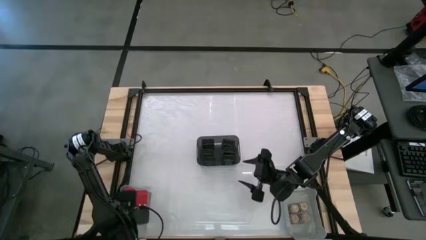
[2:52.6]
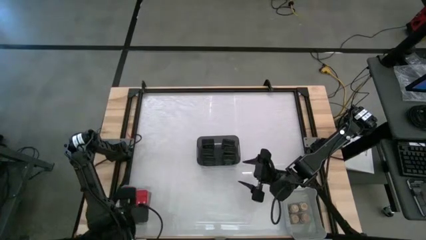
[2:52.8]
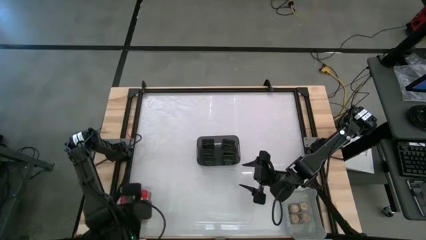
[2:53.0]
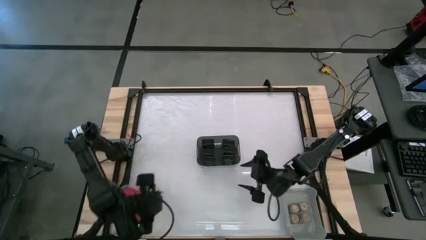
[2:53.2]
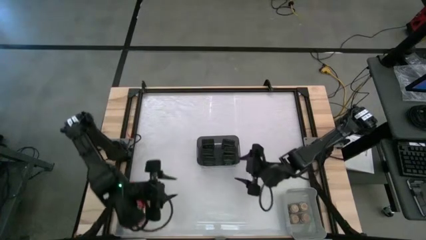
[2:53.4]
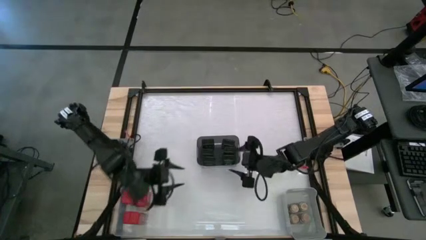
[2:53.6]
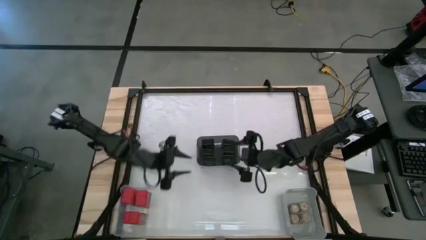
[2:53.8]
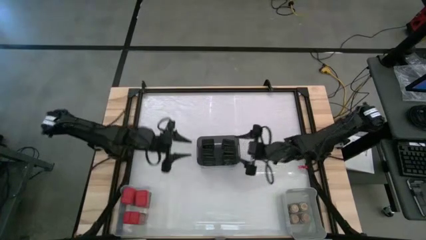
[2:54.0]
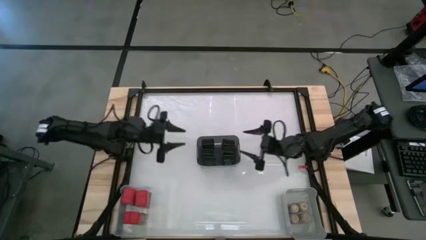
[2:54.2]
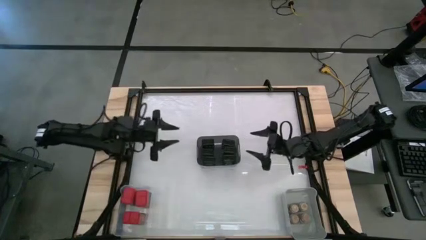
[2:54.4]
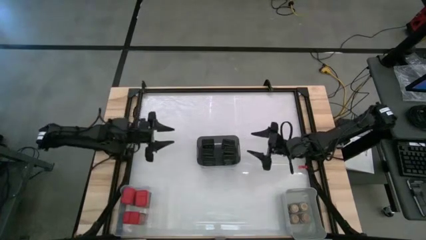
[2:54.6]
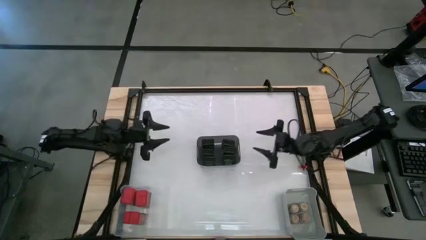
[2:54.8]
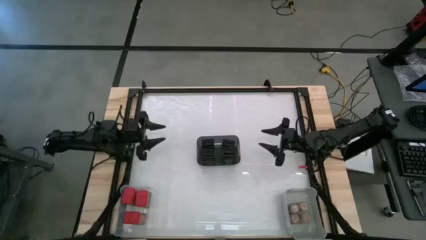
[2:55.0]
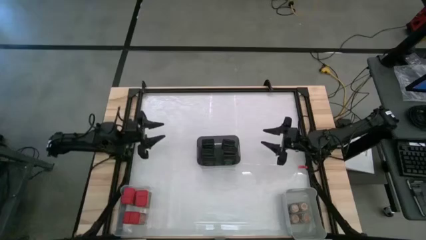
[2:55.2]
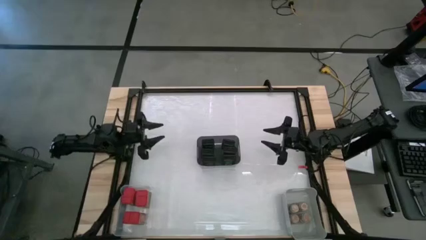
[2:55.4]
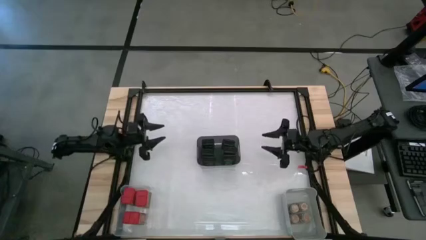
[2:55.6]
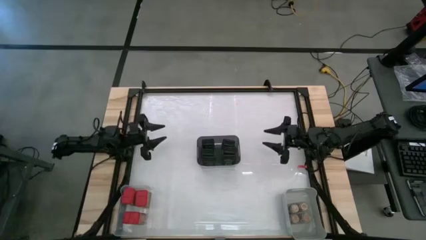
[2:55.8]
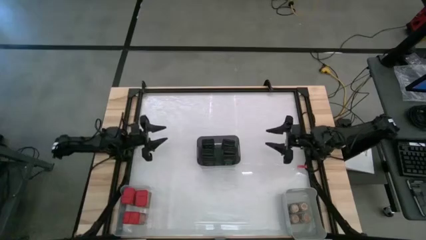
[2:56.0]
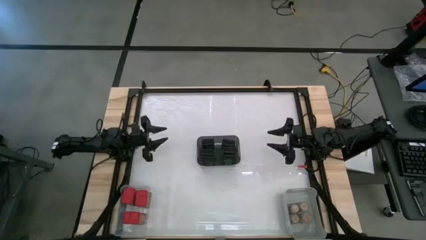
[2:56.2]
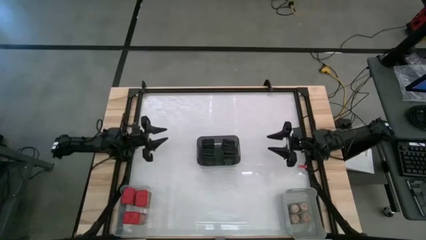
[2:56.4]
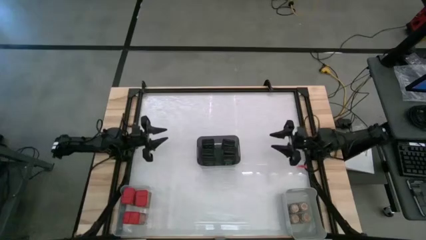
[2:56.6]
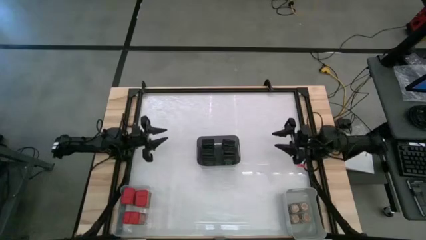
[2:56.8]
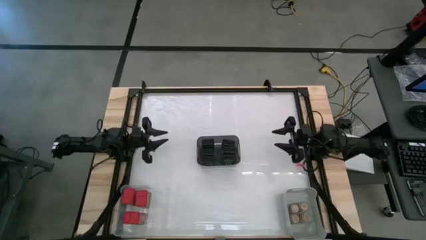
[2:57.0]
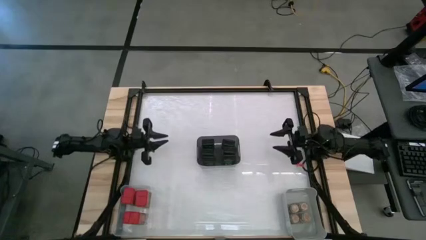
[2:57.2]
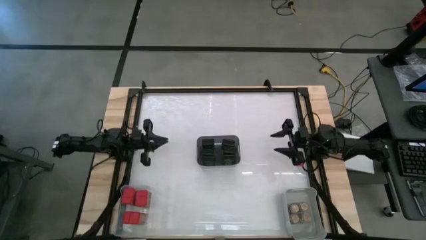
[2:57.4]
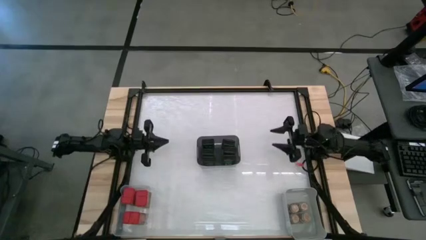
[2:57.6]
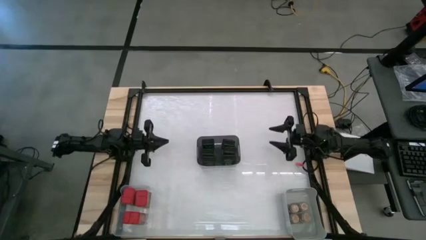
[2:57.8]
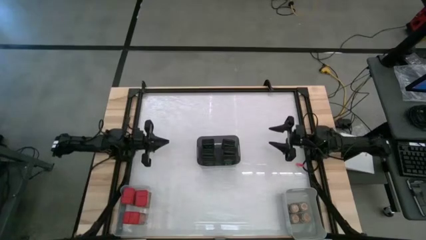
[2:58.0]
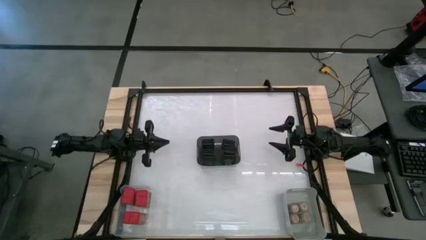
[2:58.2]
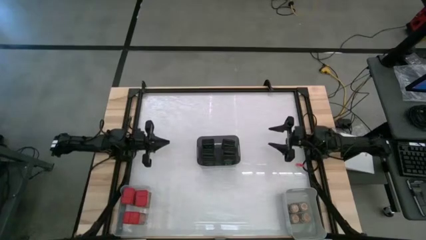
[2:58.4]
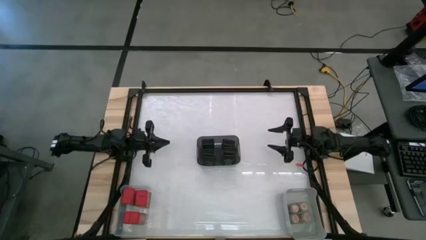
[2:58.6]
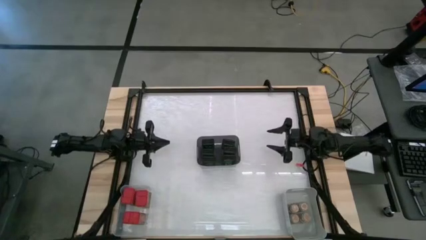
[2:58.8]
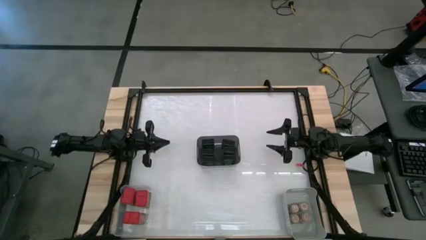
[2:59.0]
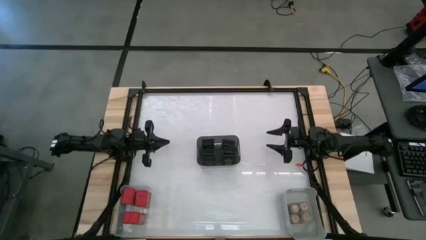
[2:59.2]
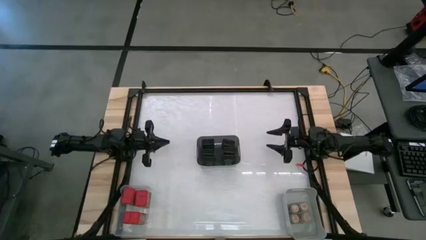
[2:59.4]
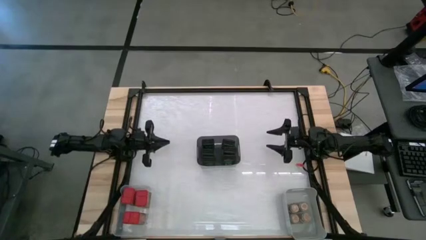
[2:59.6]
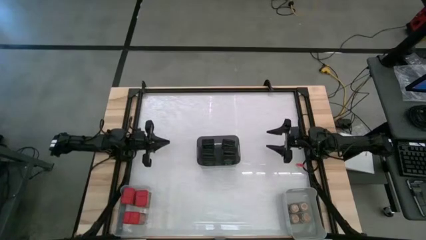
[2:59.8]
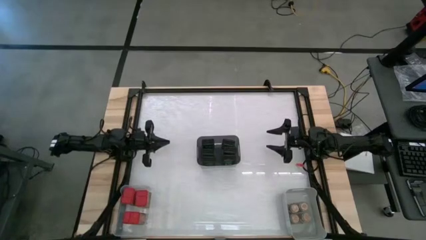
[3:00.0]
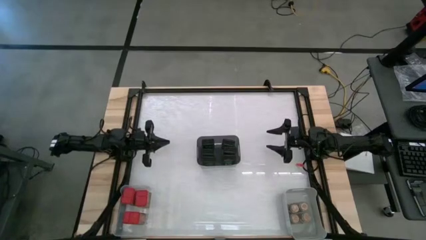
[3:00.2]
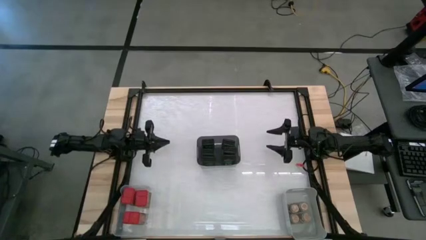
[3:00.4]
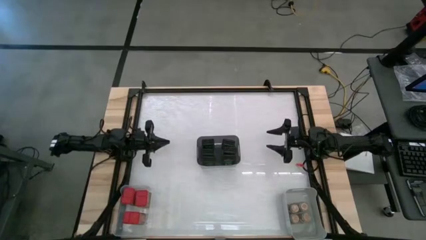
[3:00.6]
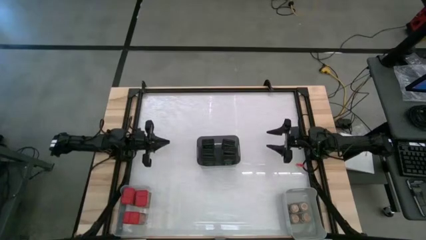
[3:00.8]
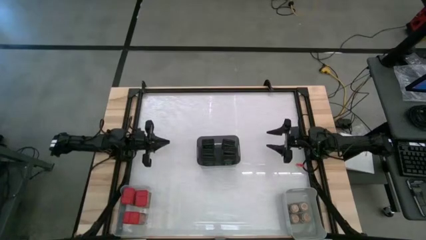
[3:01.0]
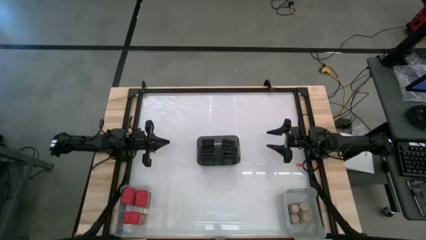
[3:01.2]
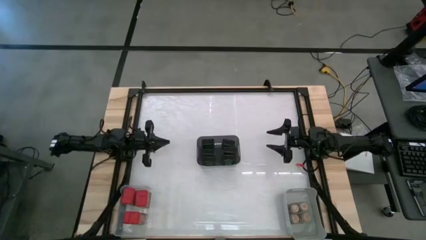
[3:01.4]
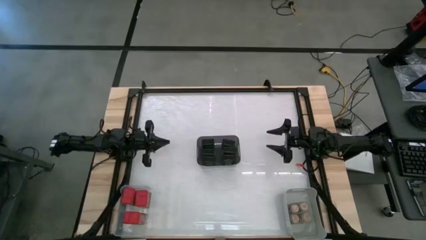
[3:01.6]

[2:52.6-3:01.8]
Task: Sort spices by type
Return to Home Position

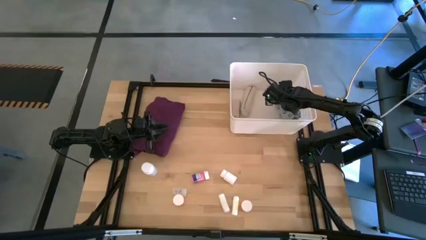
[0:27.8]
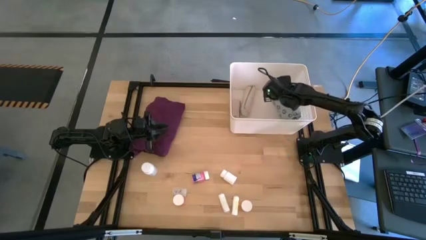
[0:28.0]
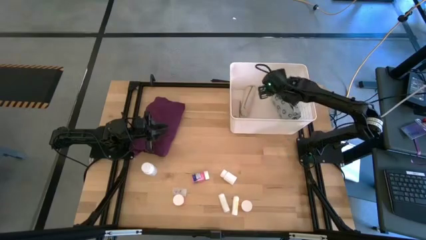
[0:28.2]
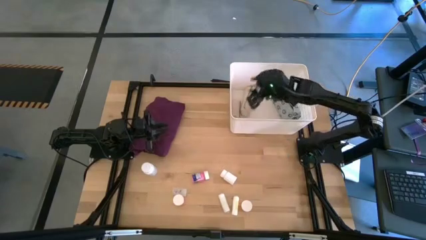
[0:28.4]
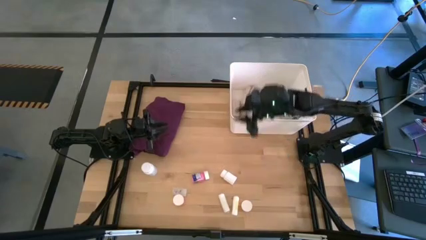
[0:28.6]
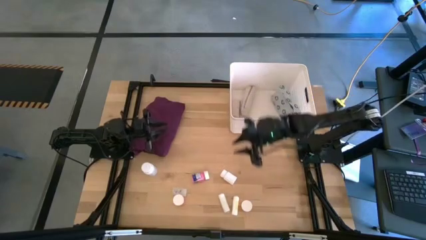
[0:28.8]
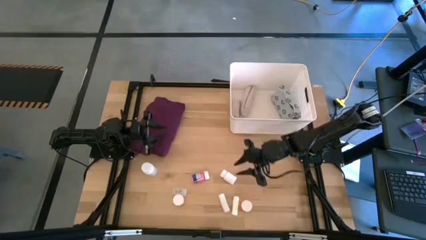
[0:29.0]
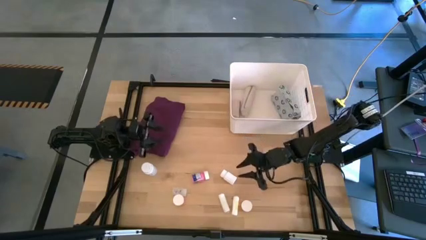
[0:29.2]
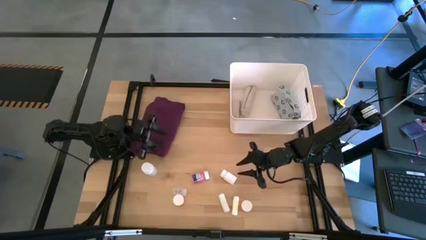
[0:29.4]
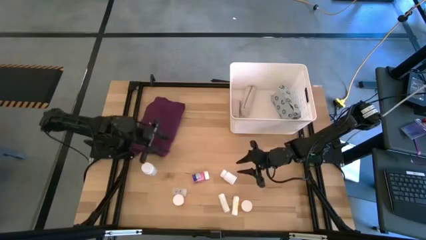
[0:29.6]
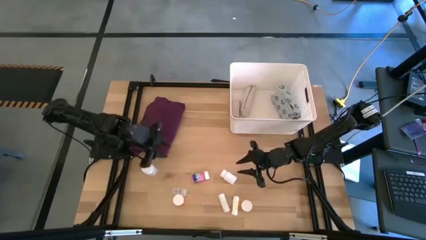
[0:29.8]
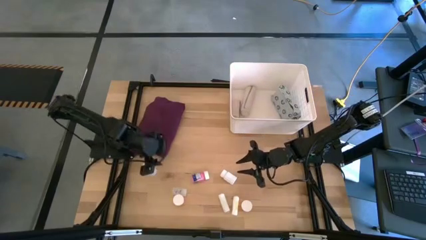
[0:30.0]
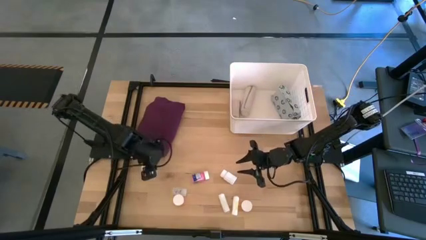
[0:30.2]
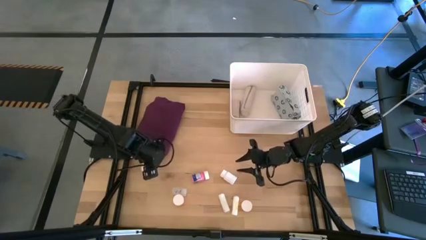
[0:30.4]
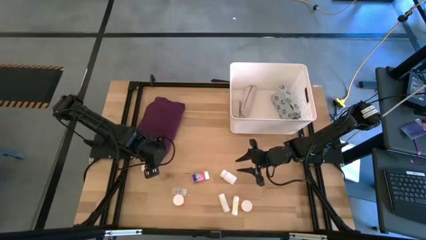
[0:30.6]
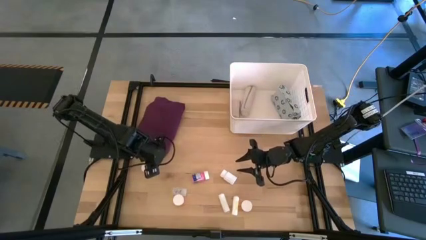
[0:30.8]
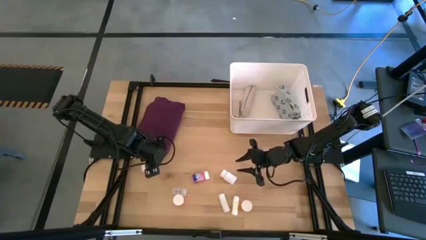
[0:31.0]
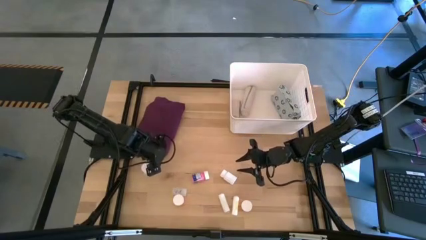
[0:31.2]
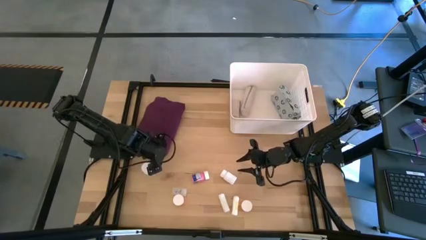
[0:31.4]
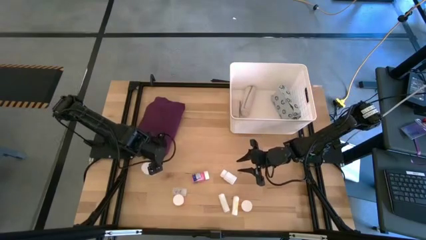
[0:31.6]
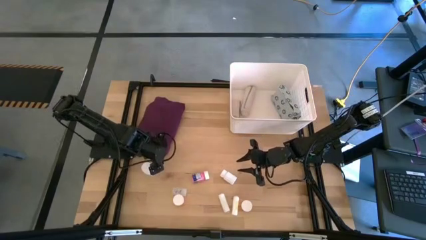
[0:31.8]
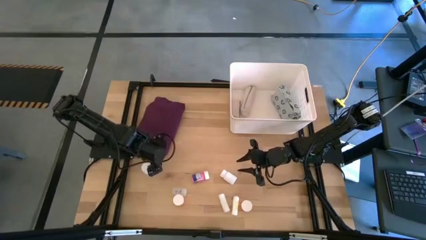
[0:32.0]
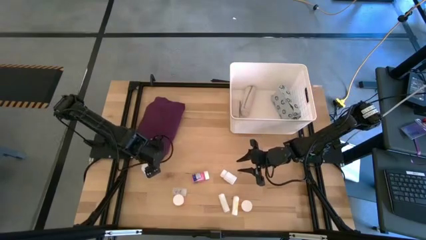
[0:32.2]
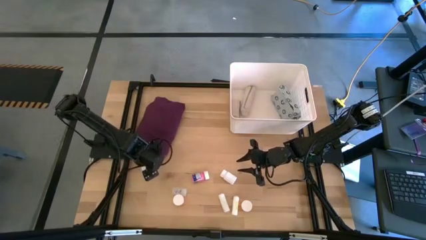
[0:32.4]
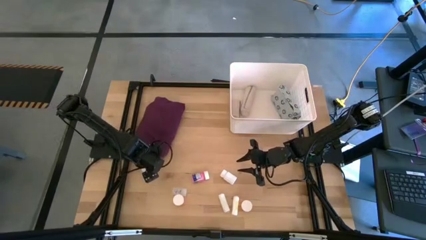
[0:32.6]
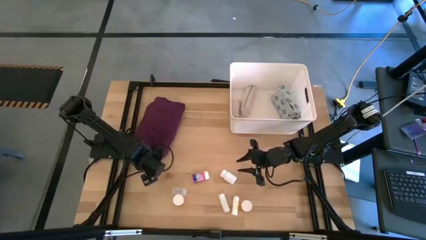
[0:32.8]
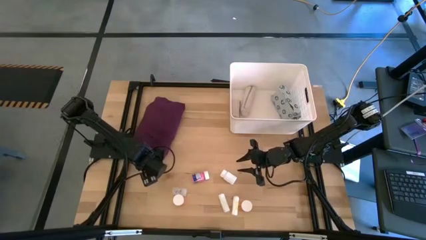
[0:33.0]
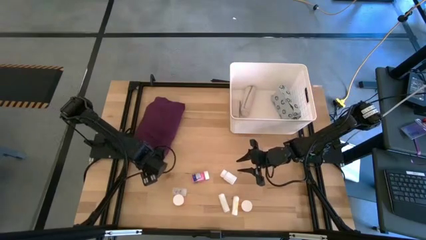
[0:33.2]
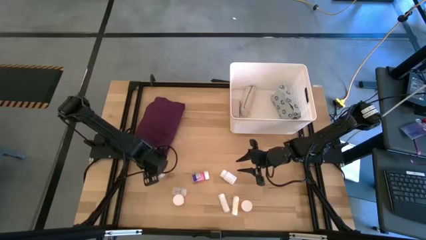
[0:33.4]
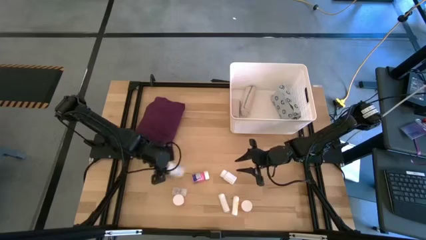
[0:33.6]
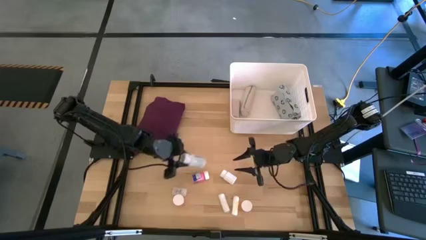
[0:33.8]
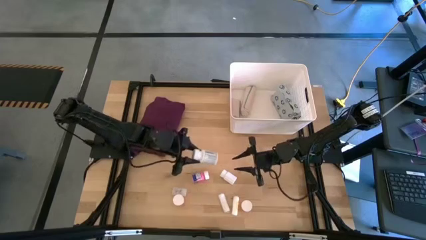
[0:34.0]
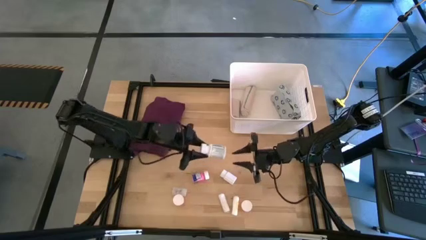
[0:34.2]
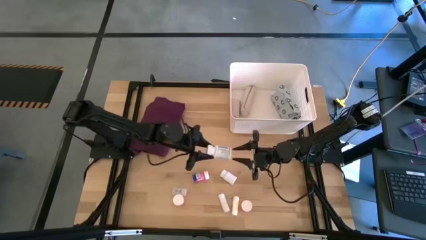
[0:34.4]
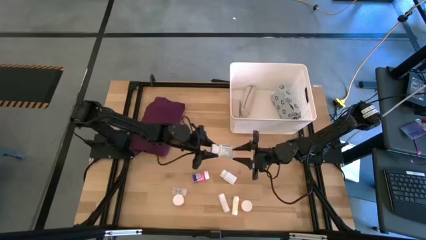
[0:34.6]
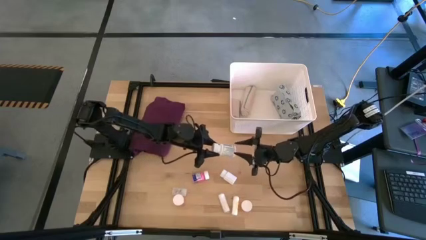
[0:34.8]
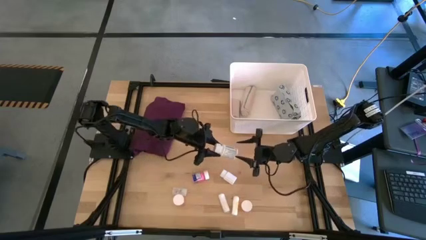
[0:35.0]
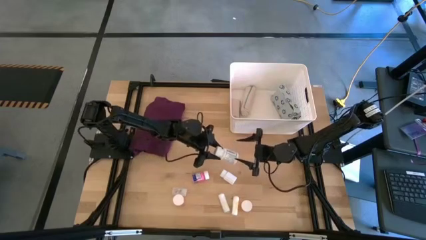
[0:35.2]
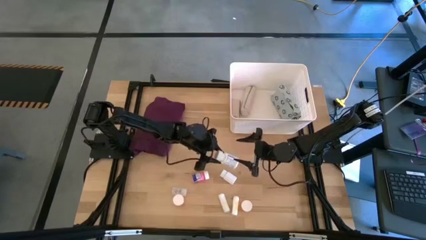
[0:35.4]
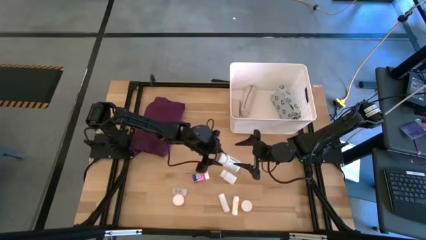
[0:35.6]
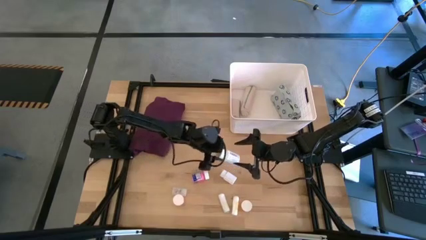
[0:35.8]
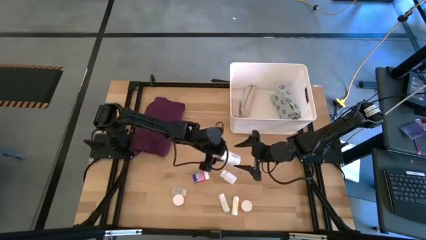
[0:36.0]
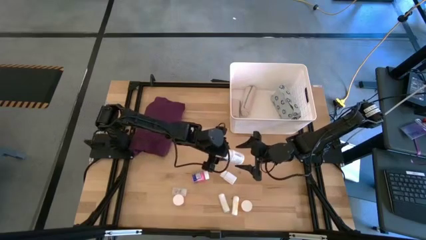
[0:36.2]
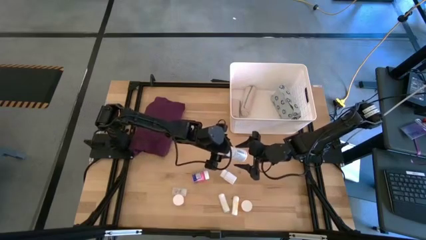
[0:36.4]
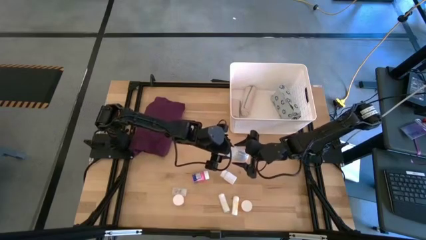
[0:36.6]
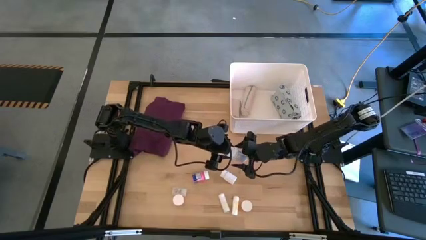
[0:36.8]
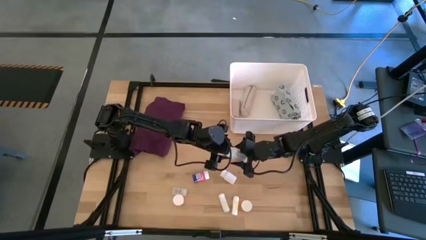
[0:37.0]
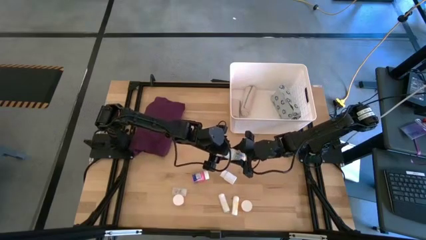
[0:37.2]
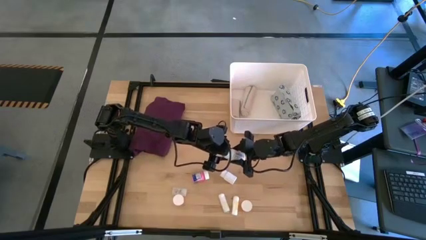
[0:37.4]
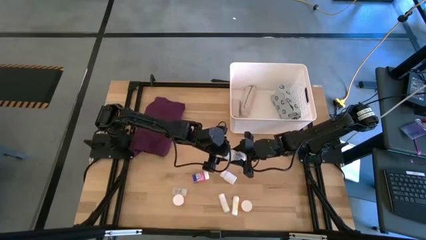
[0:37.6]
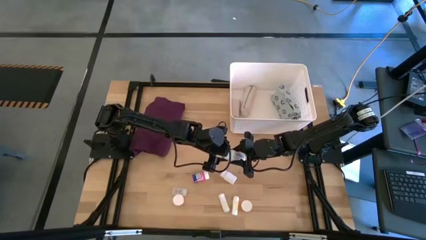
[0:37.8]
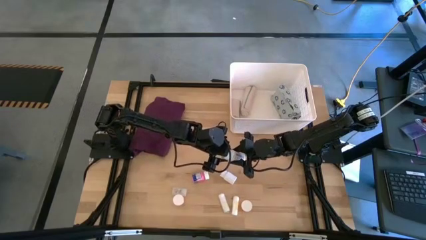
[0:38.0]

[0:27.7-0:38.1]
Task: Pick & place medical supplies in basket/bin
Put the left white pill bottle into the white bin
